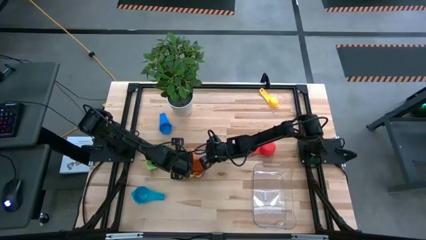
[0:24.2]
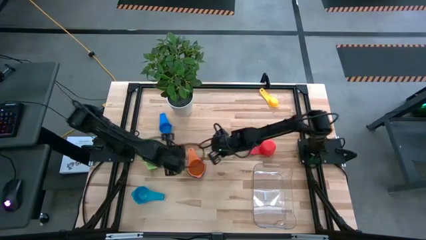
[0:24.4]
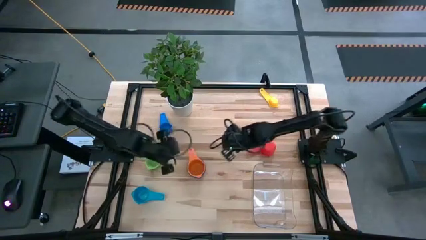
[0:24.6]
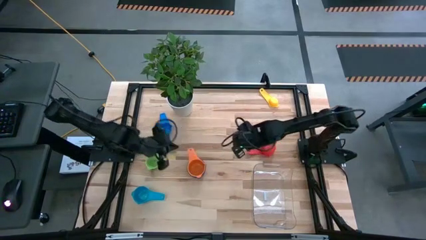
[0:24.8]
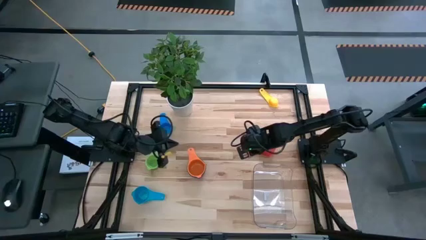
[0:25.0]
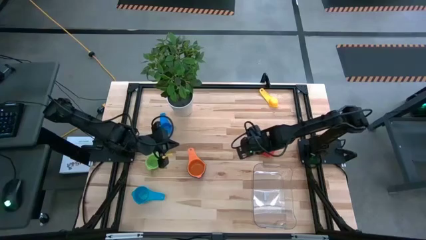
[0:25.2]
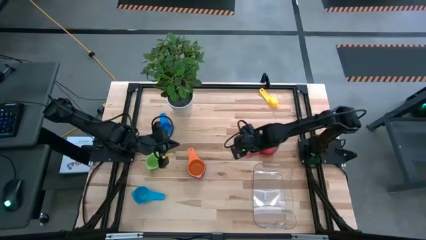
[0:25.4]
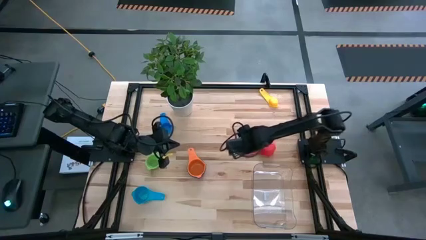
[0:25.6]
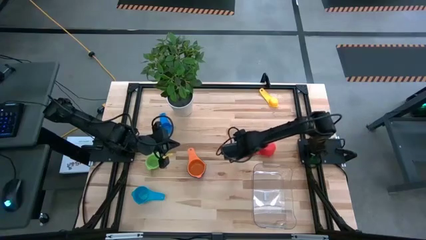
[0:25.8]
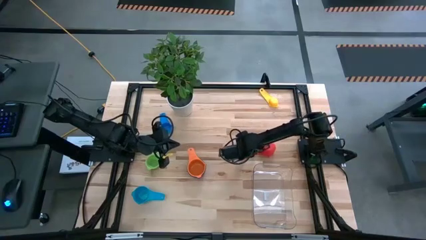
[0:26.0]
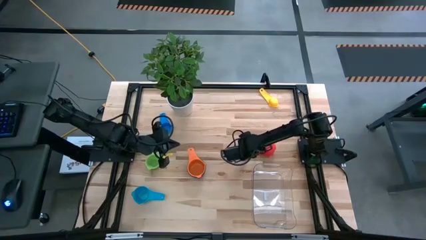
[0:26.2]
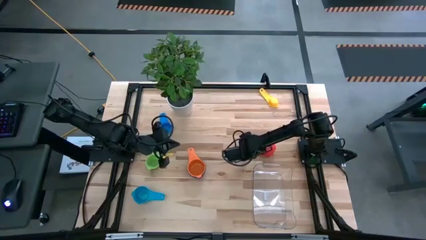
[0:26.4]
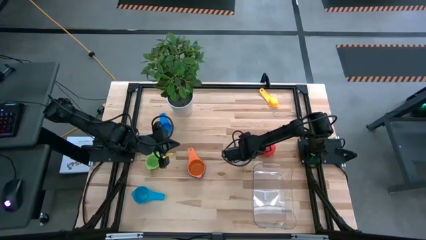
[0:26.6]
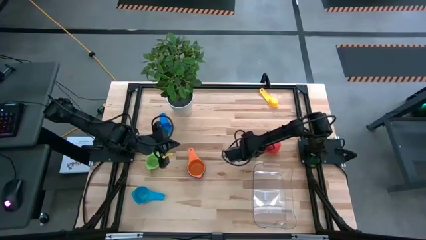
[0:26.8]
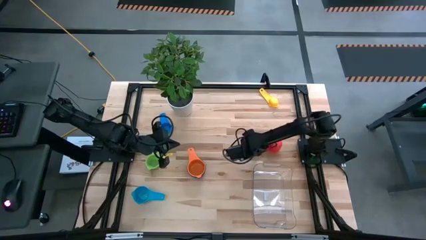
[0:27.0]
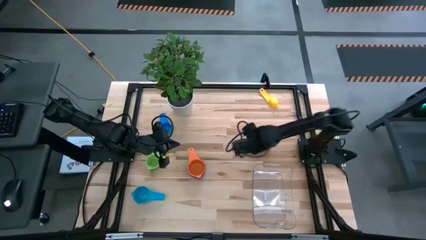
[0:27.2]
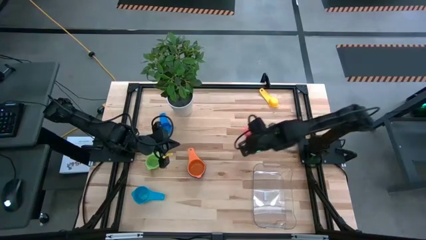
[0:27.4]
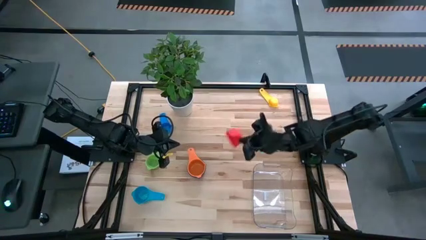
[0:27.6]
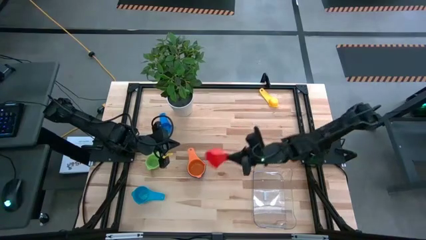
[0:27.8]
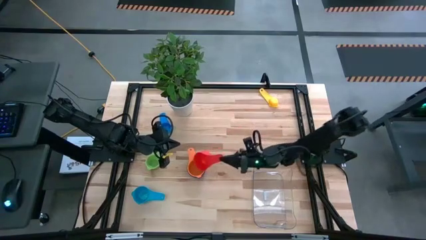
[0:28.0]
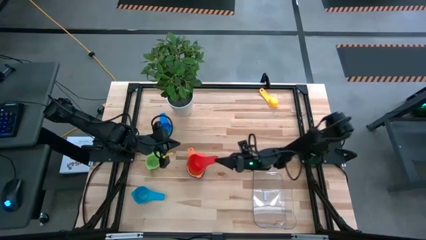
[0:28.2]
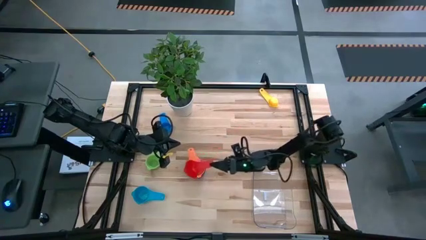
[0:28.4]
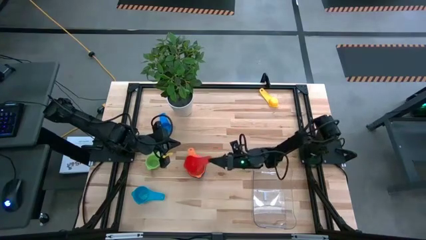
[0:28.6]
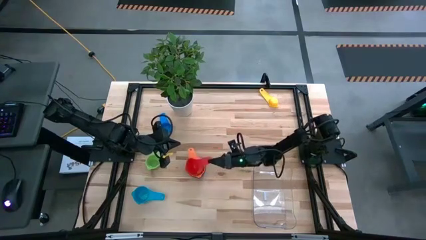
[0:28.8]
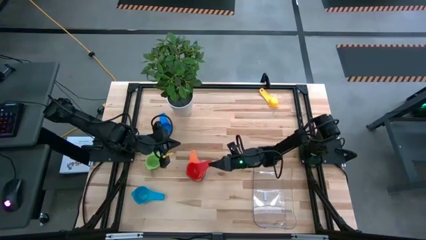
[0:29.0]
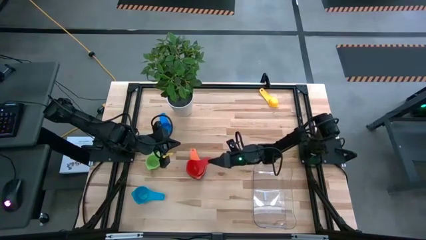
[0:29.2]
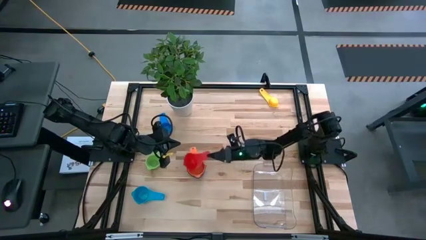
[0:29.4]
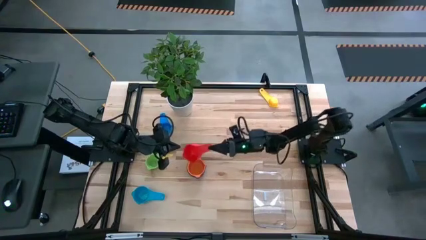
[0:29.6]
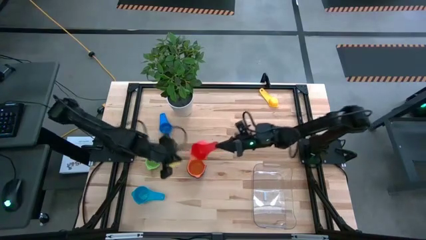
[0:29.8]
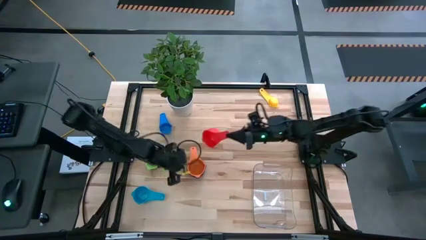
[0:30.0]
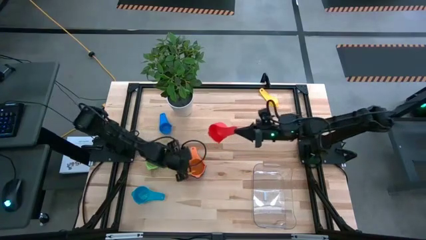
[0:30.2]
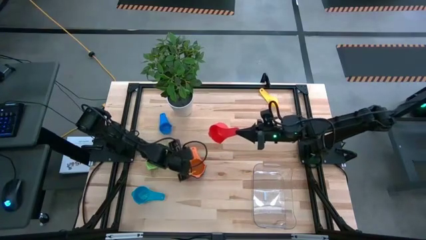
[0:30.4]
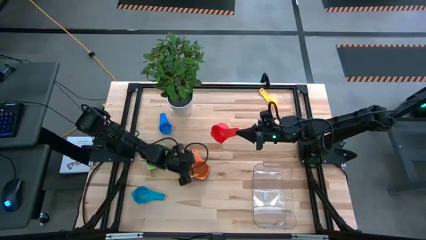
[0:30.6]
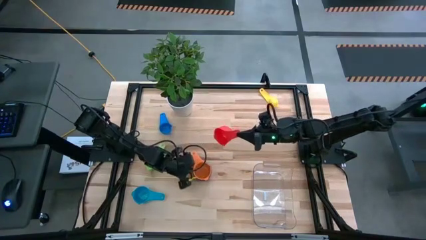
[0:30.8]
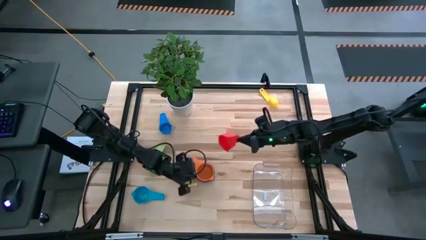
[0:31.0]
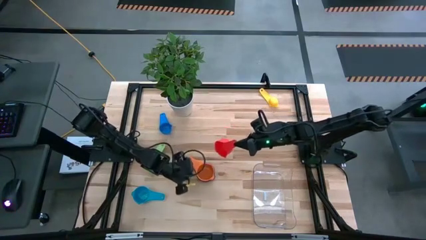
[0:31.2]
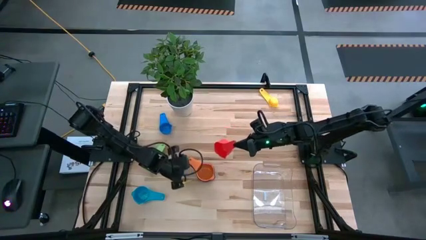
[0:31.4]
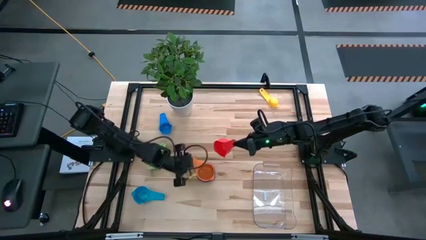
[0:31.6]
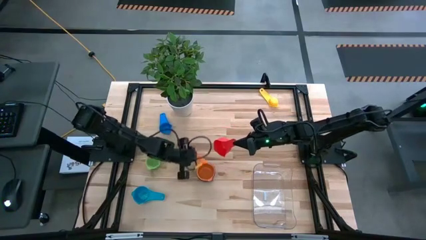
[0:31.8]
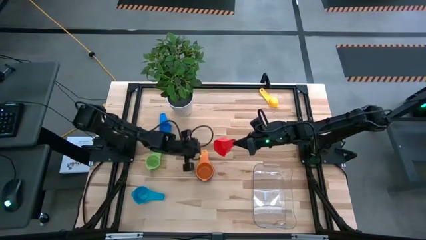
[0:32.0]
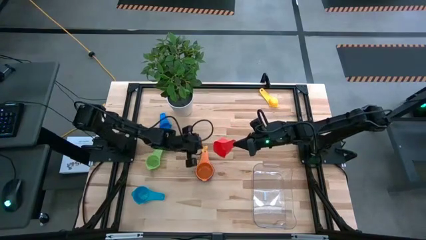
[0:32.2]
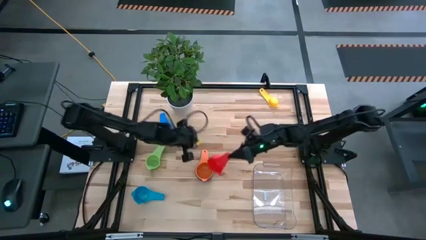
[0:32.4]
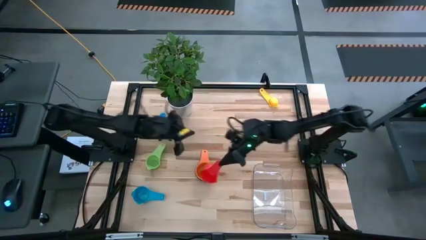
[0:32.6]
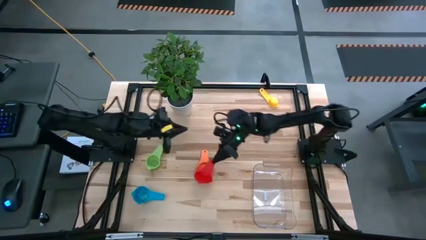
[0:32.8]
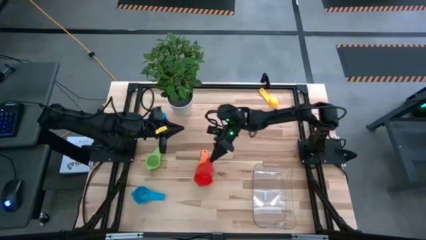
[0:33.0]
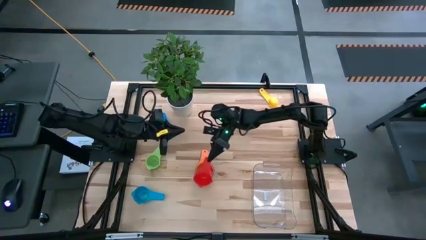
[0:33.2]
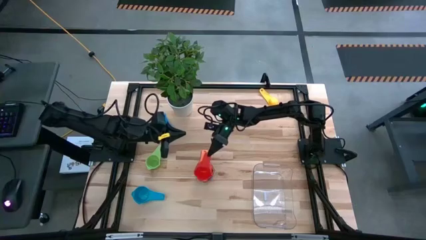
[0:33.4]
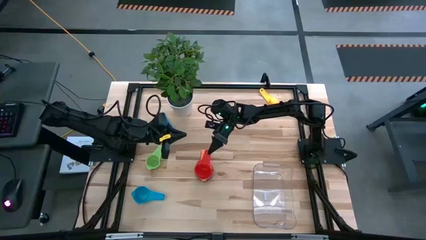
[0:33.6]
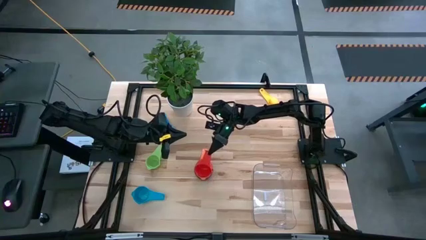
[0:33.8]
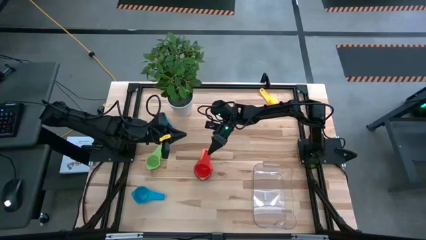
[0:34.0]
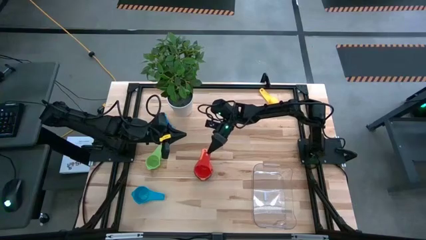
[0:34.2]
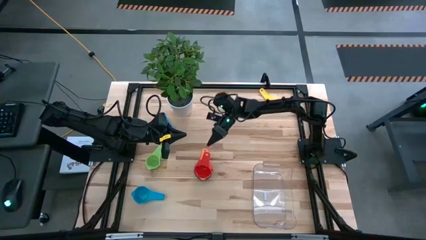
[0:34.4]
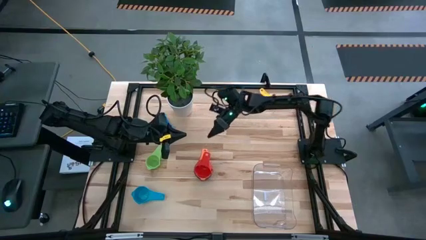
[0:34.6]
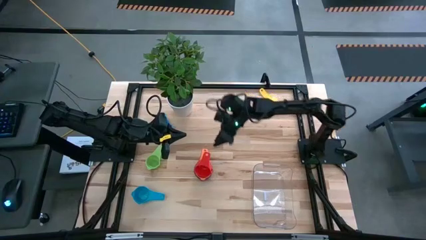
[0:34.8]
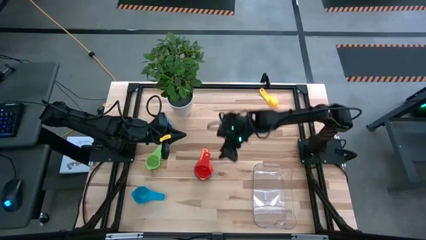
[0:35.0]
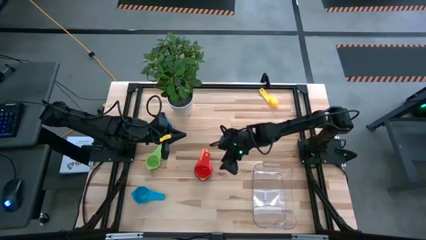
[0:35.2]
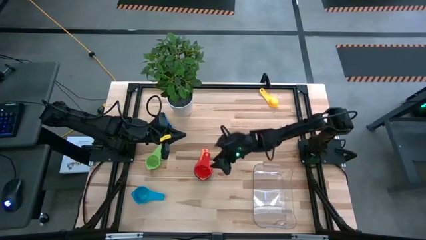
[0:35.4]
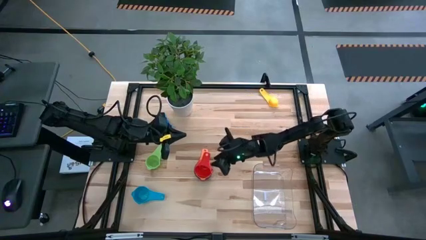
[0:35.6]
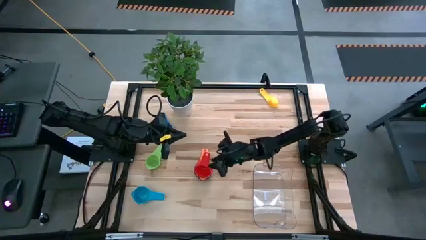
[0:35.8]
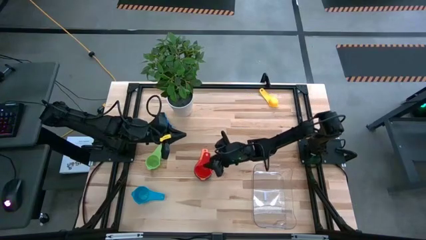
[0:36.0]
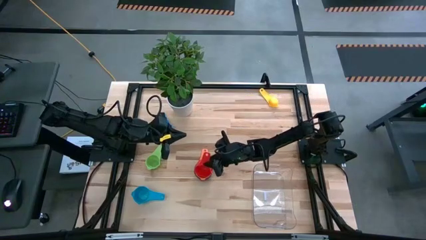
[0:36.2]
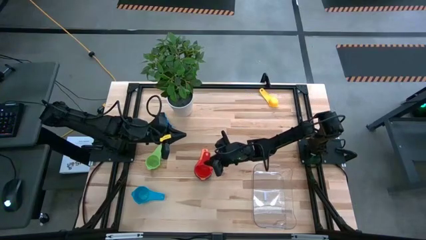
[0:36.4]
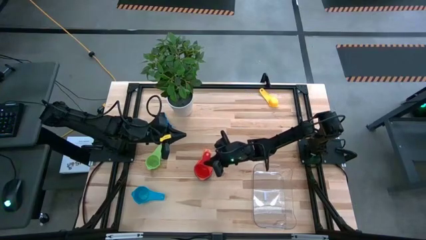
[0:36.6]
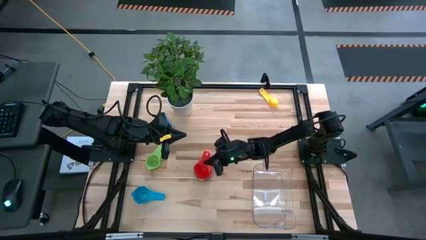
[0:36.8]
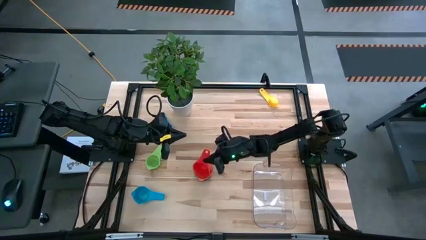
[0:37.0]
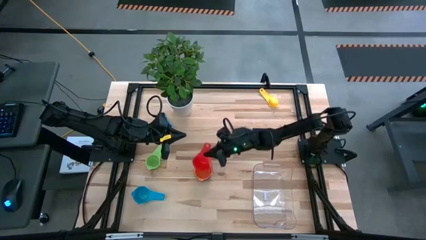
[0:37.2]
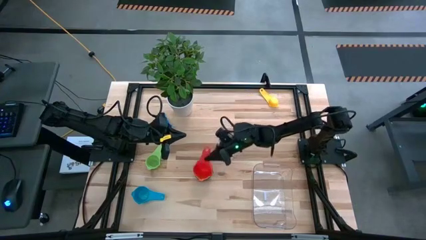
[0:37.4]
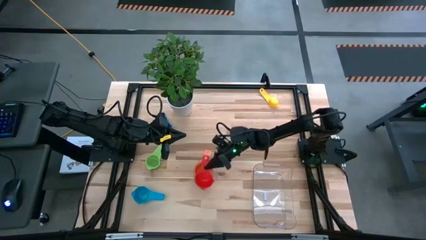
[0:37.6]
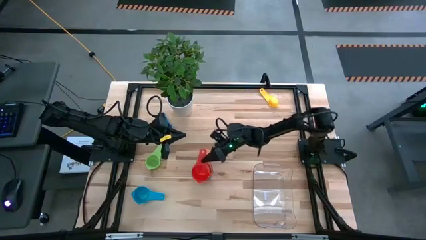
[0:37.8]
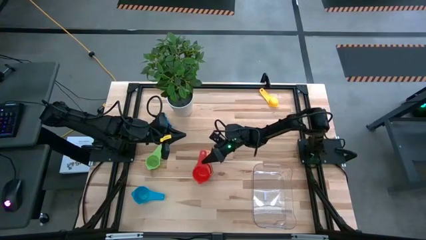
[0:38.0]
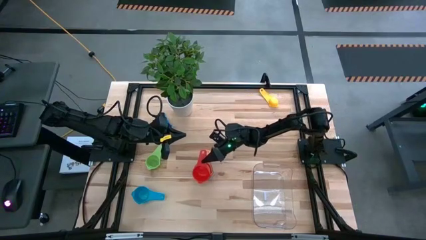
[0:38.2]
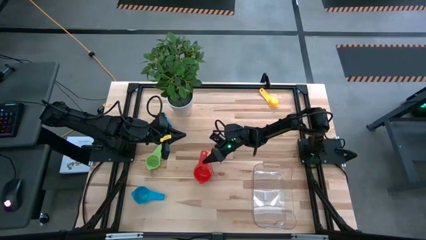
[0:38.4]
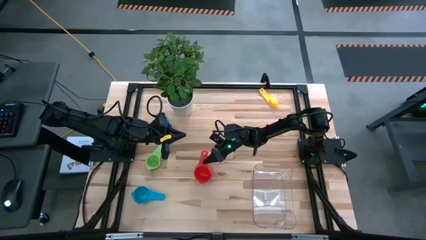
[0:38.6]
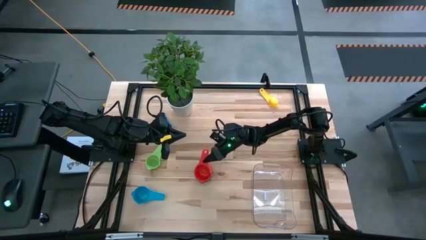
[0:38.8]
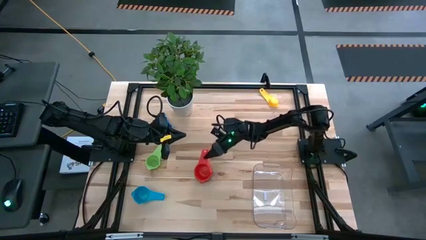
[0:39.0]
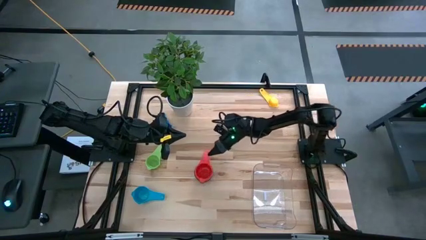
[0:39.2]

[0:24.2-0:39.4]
Task: Nest measuring cups in basket
Stack the red measuring cup on top of the orange measuring cup
